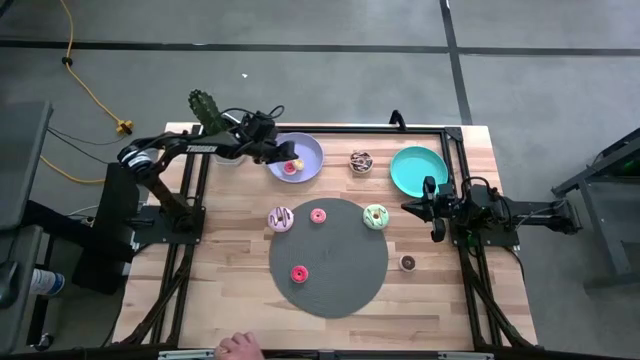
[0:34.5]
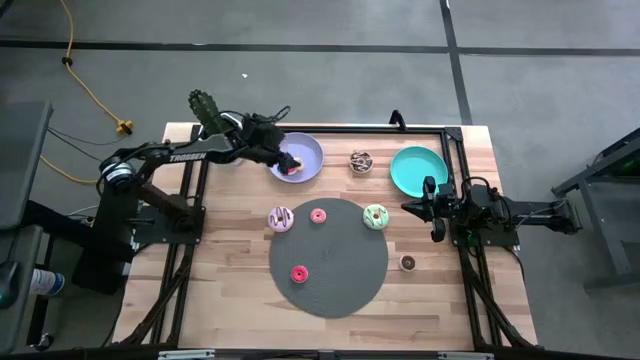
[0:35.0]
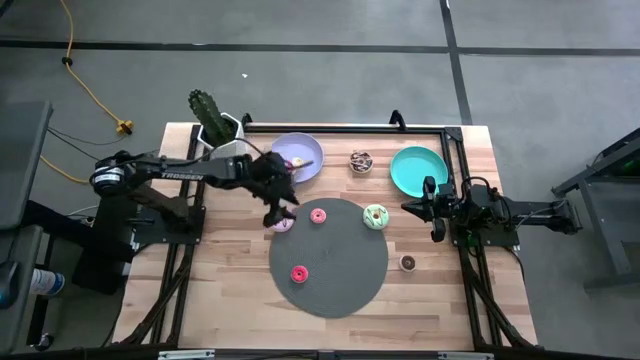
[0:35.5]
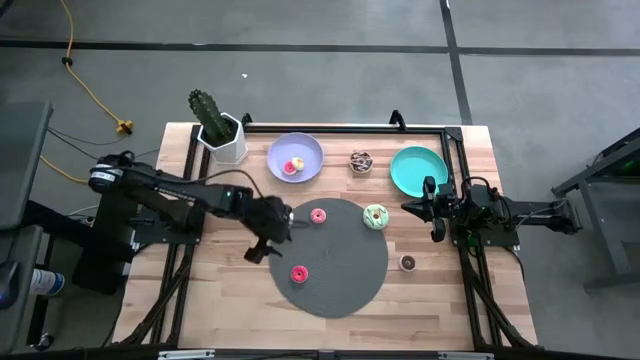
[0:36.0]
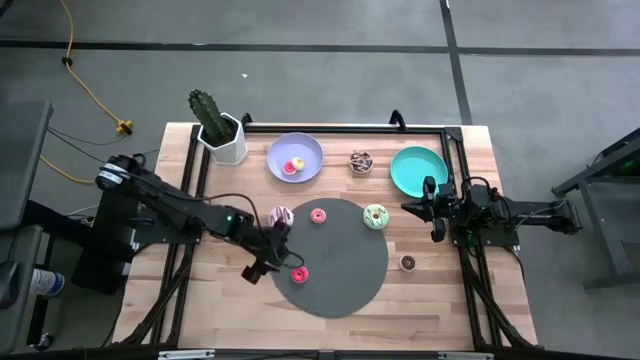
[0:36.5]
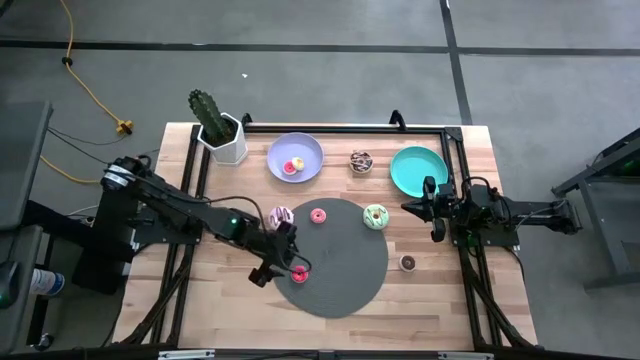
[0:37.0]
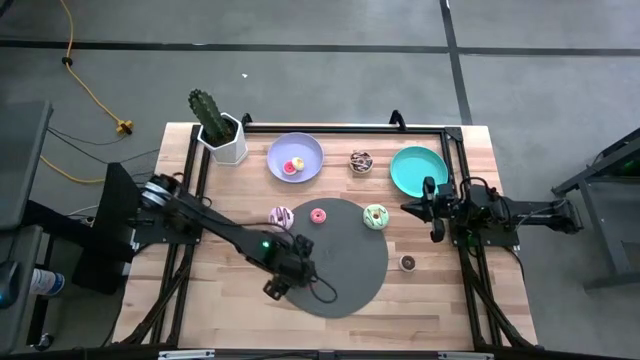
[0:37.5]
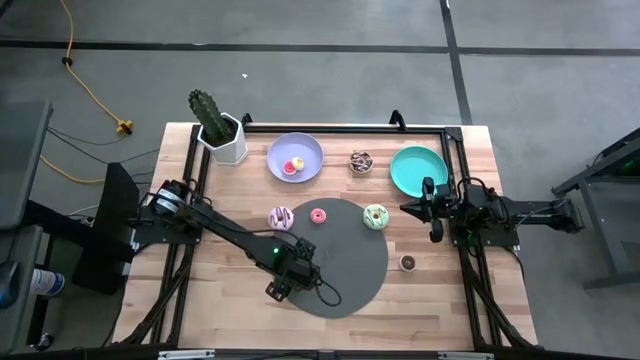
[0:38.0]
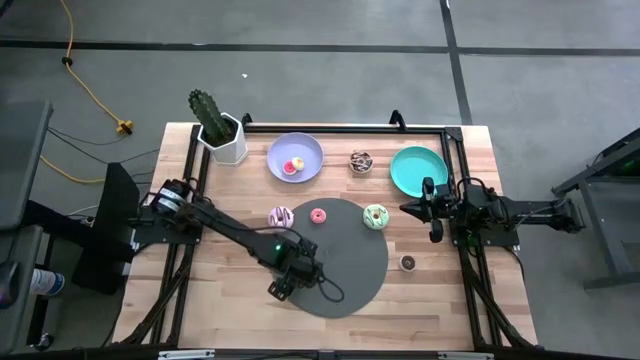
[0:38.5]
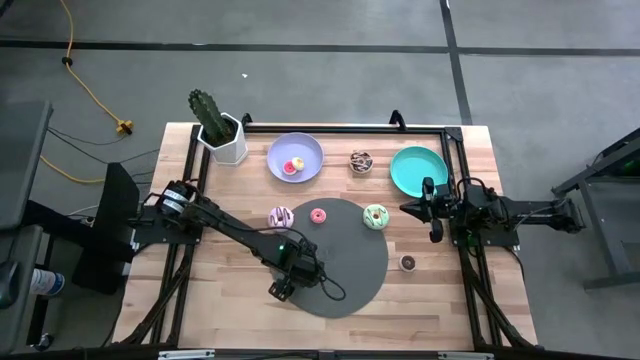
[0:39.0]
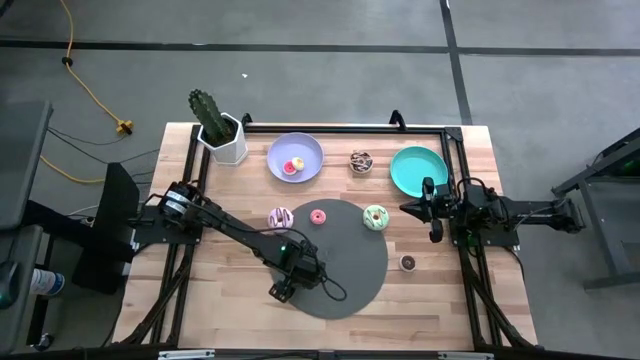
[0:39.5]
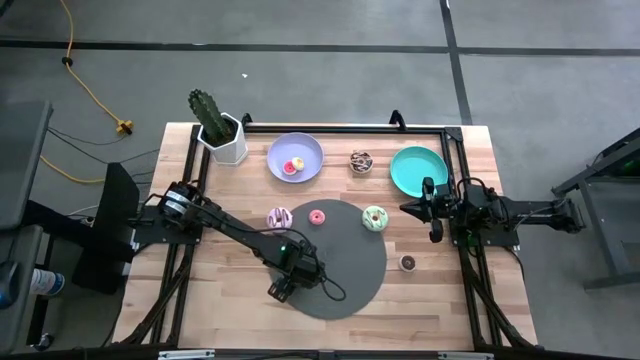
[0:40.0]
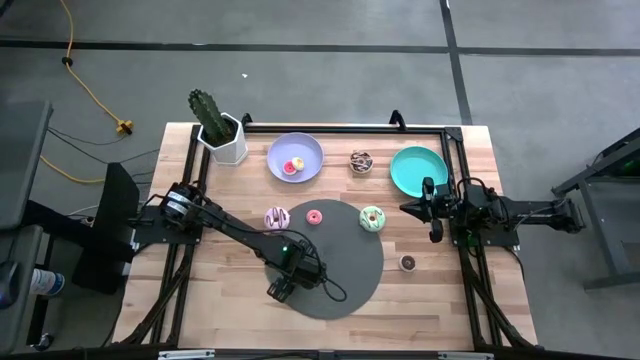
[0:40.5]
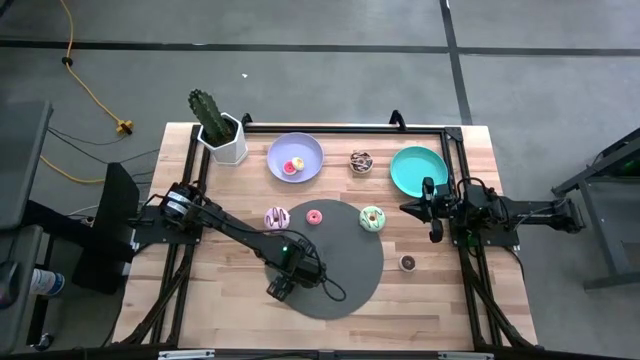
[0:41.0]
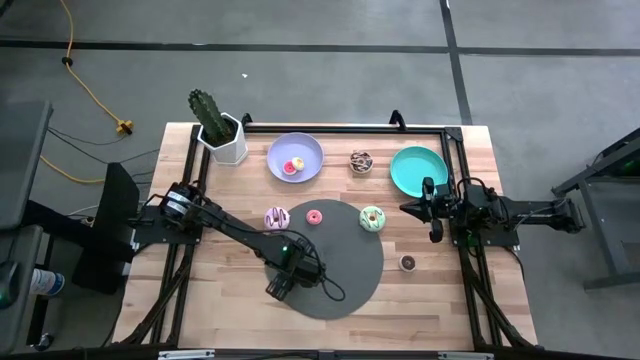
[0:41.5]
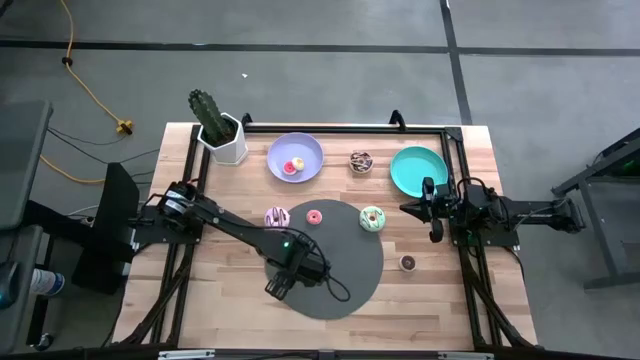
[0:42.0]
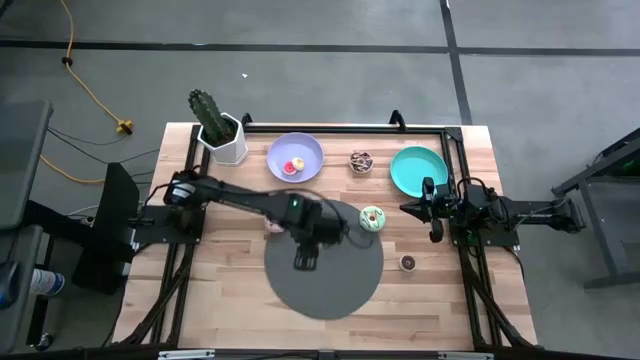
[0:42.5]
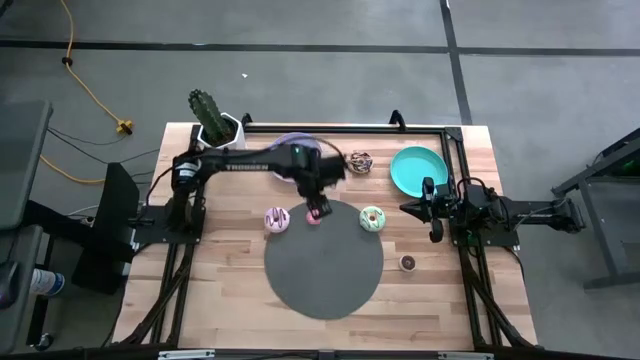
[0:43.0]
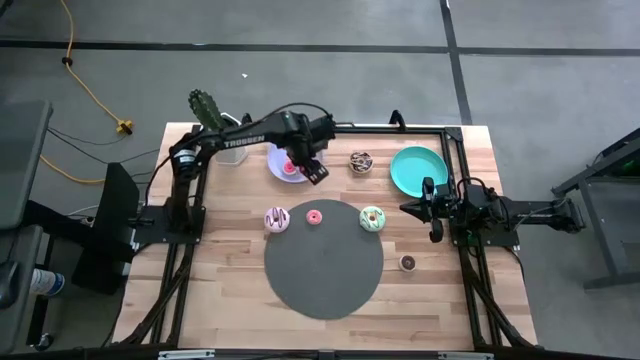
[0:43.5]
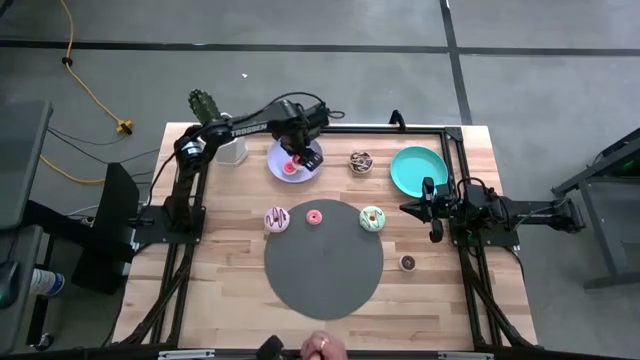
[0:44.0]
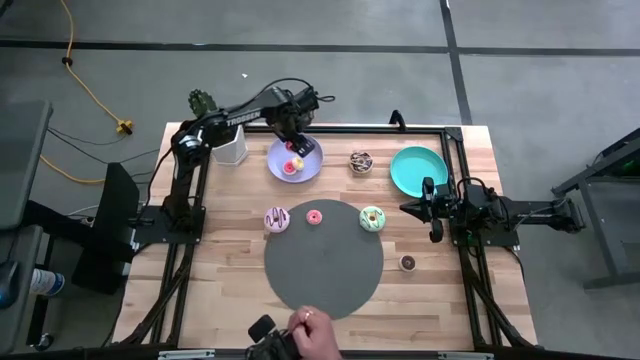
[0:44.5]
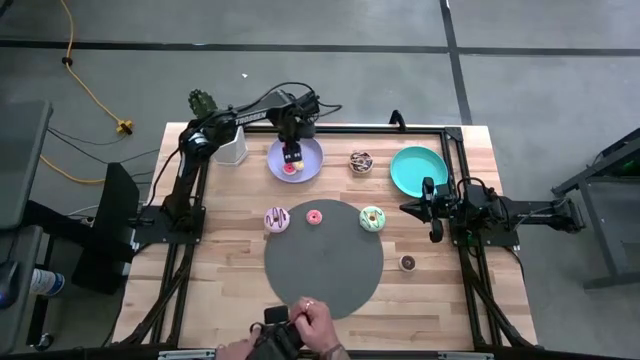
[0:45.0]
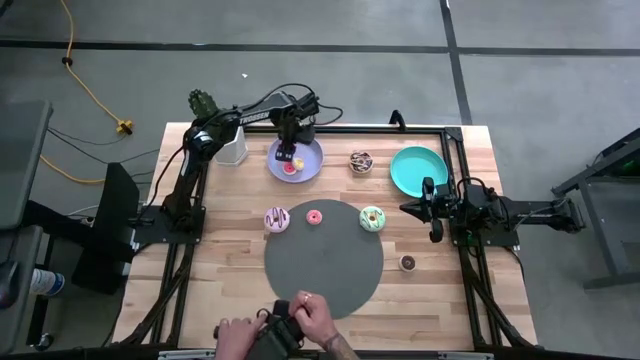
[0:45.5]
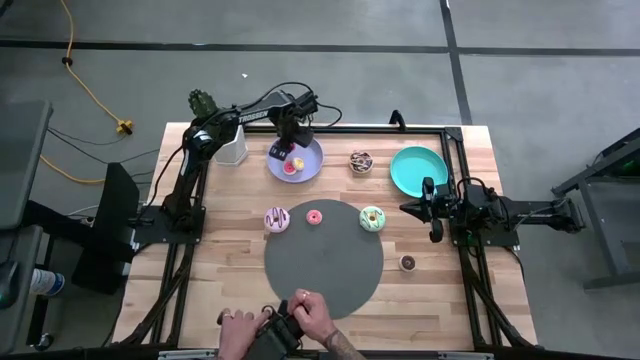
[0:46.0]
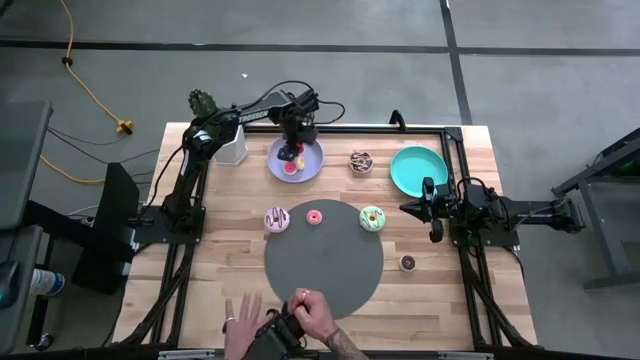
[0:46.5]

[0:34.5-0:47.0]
Task: Pick & Place donuts
Put the small red doughnut on the purple plate

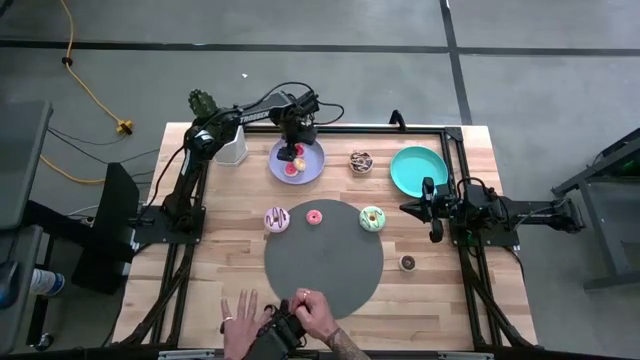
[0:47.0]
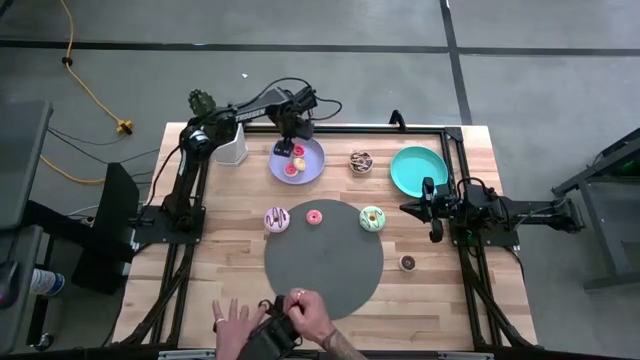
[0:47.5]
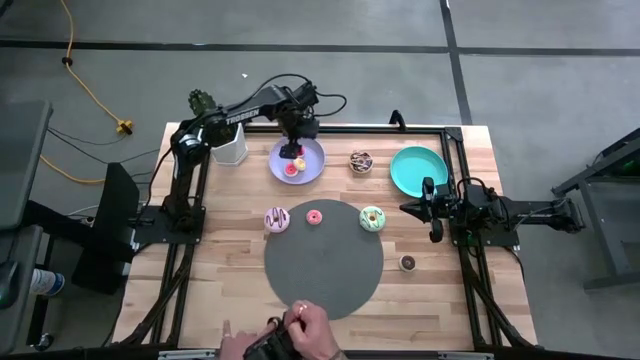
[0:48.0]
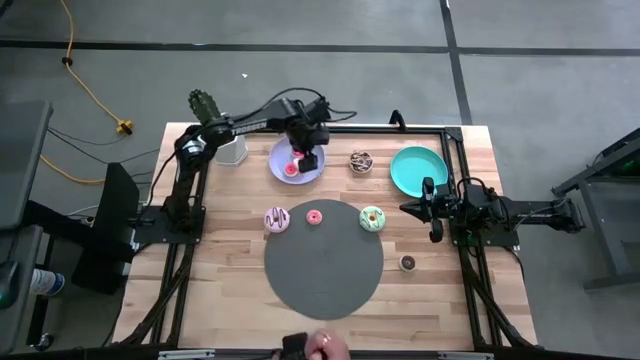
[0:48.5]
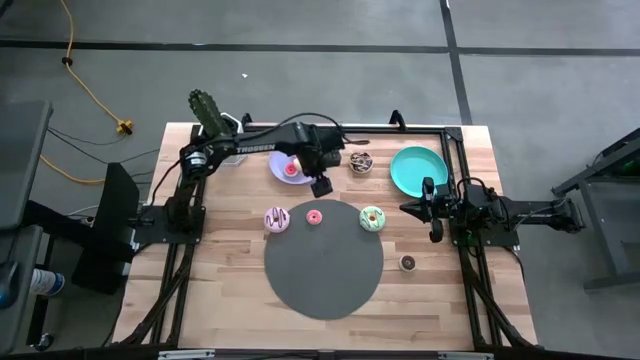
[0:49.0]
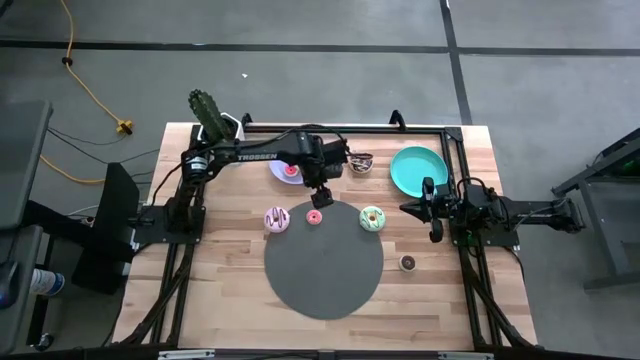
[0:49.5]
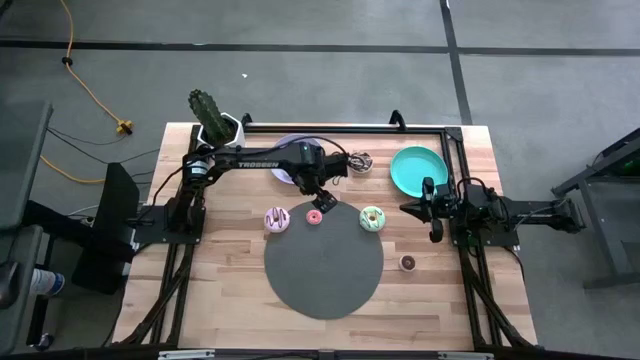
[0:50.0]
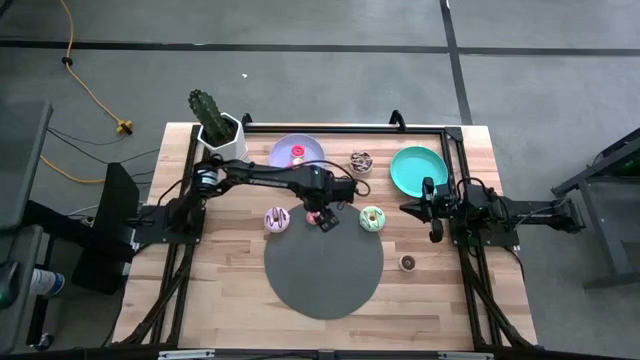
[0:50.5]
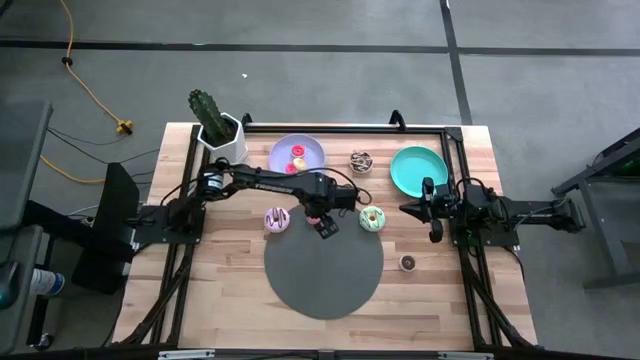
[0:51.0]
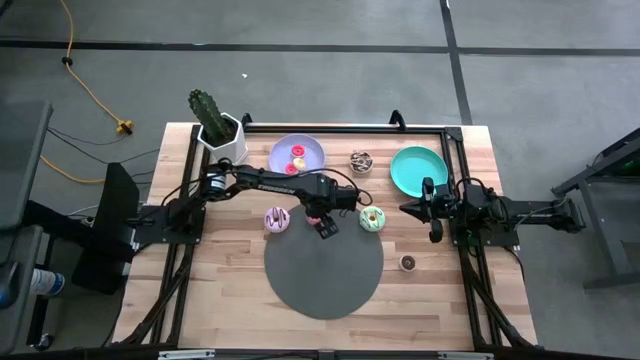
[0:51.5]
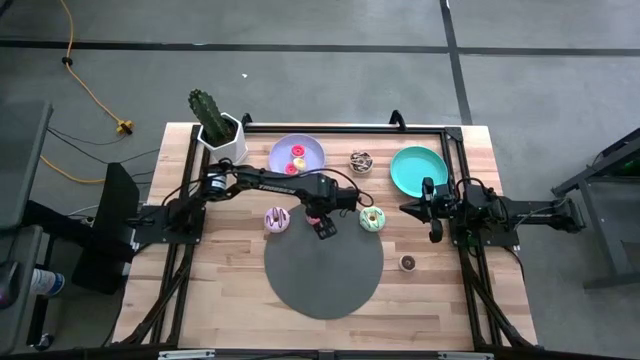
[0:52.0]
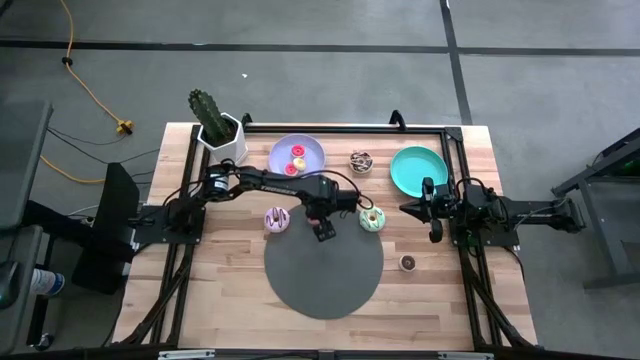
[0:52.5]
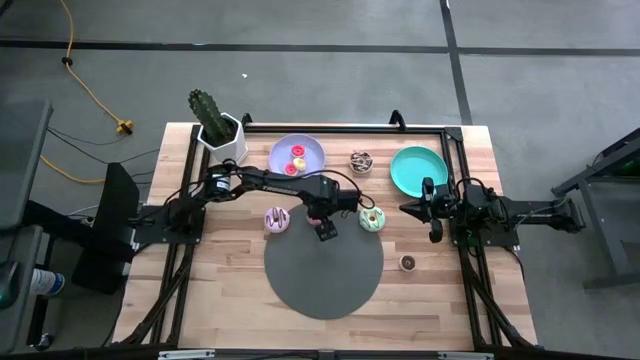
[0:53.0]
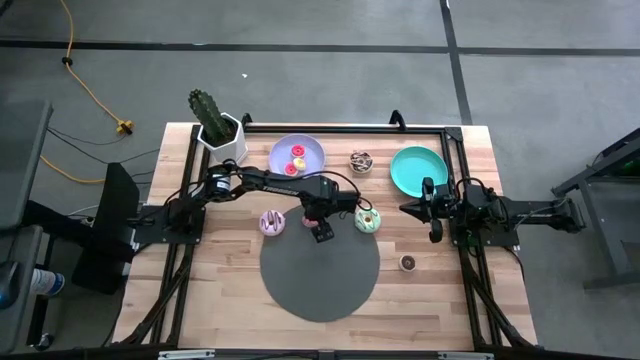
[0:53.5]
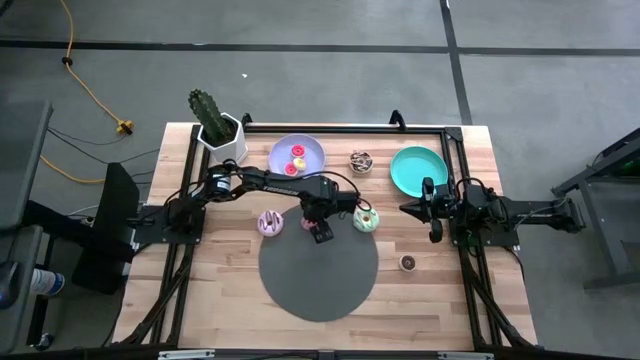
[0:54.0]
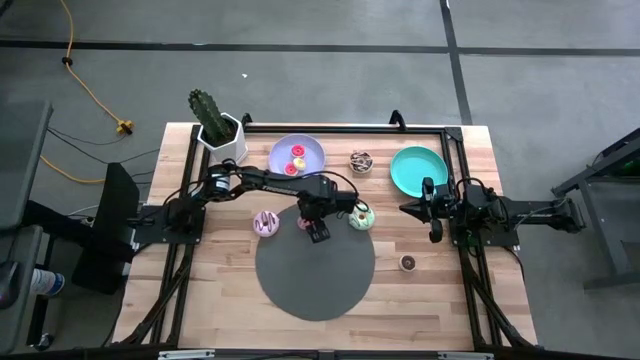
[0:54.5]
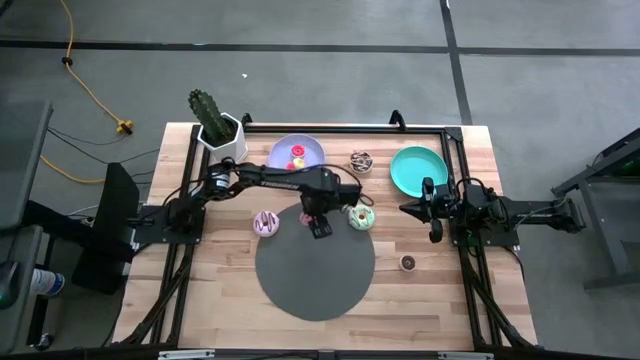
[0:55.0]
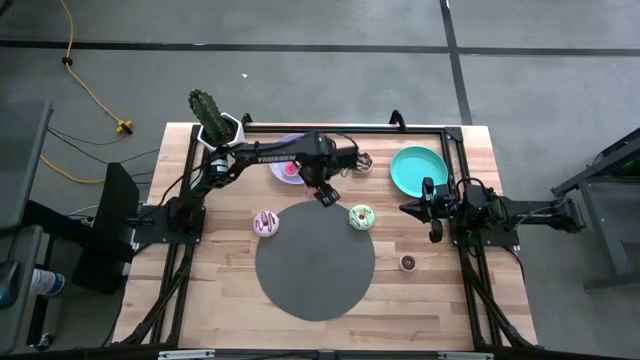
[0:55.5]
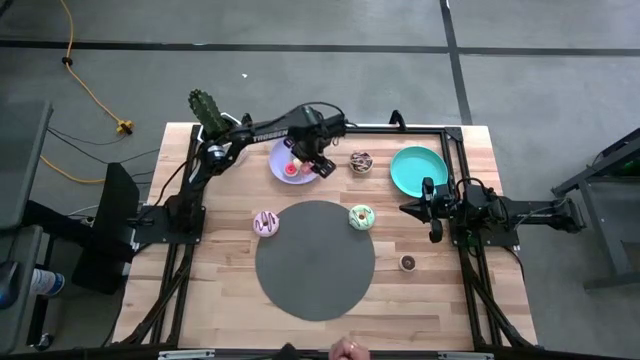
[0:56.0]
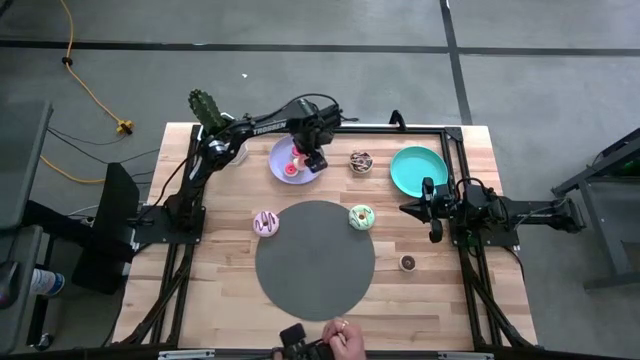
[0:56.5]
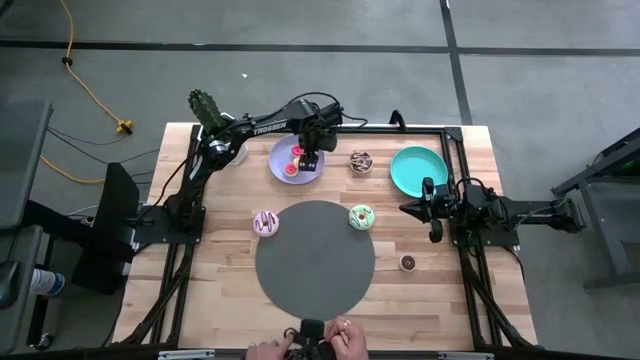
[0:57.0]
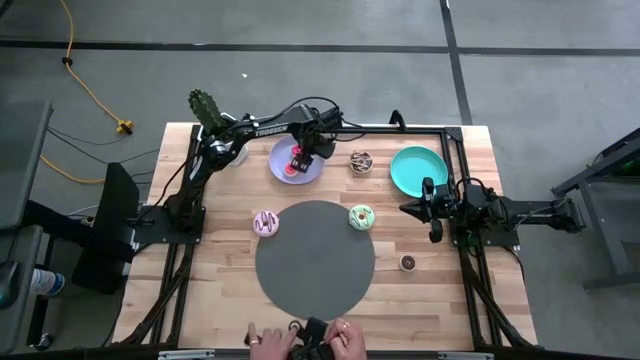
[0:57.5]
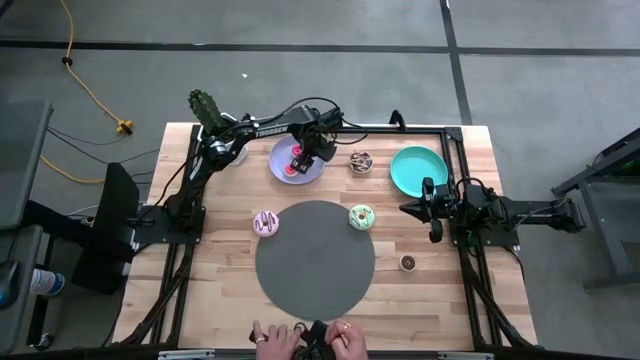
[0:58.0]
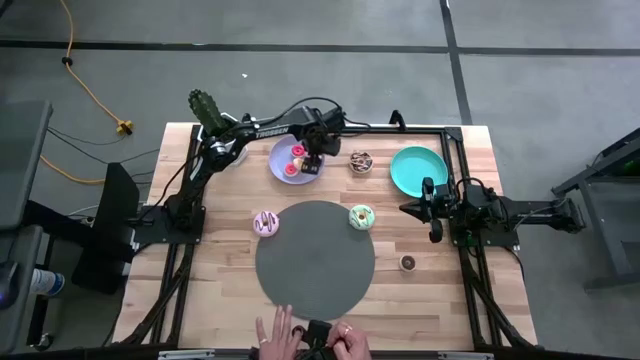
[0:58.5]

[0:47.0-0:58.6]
Put the small pink doughnut on the purple plate
